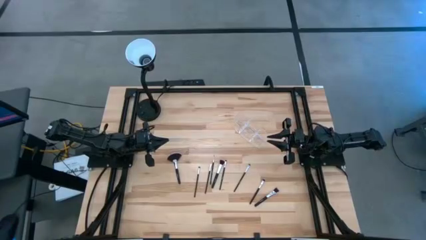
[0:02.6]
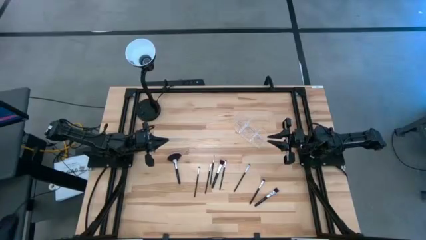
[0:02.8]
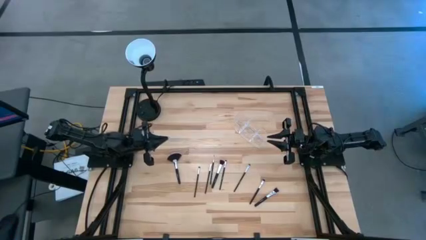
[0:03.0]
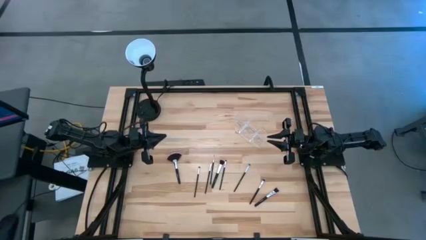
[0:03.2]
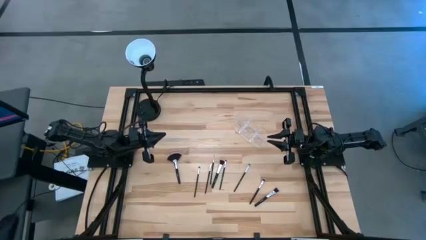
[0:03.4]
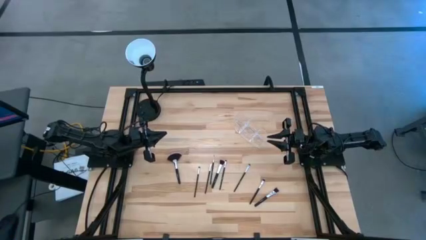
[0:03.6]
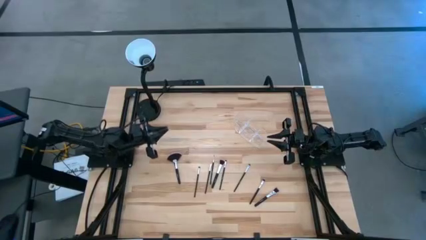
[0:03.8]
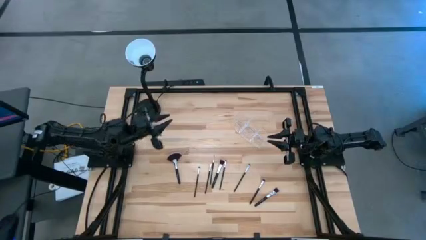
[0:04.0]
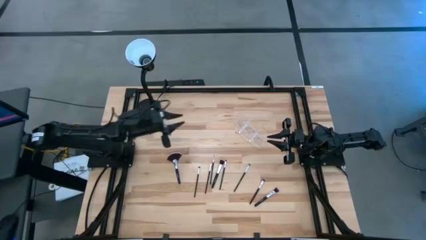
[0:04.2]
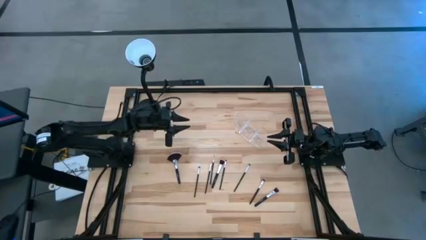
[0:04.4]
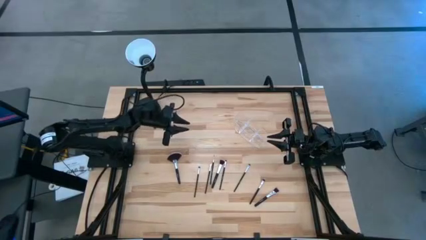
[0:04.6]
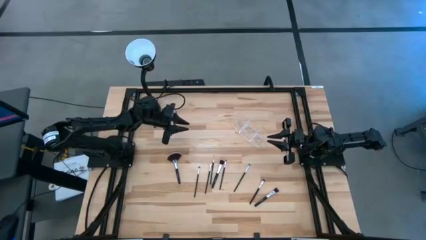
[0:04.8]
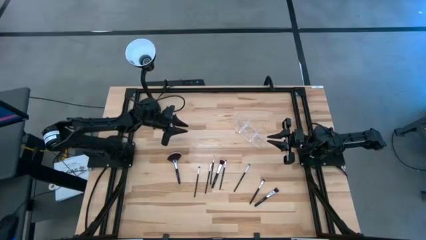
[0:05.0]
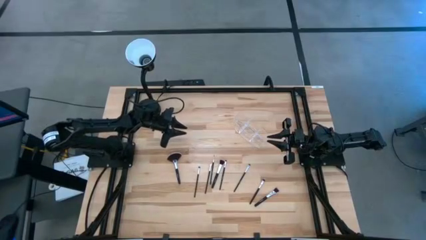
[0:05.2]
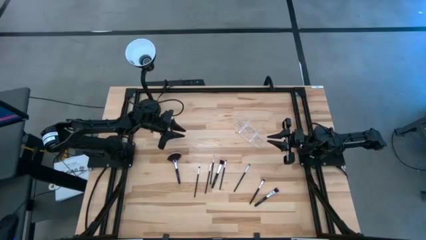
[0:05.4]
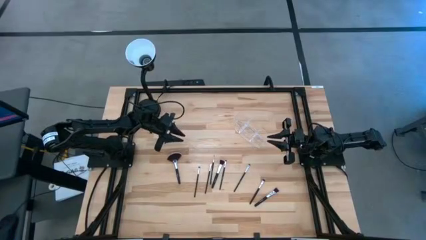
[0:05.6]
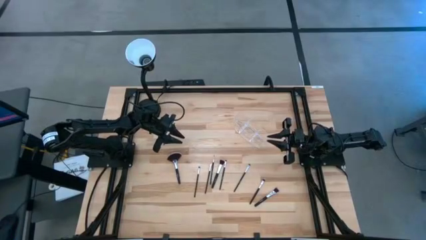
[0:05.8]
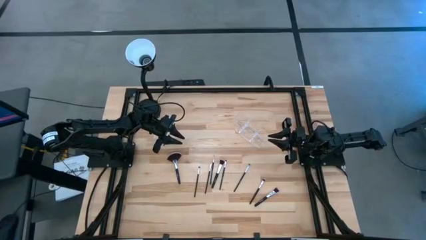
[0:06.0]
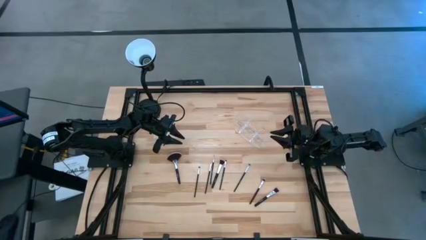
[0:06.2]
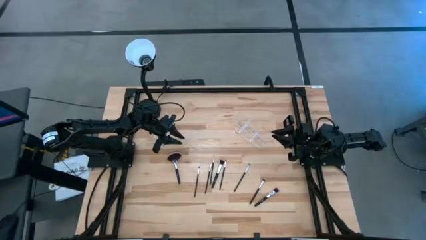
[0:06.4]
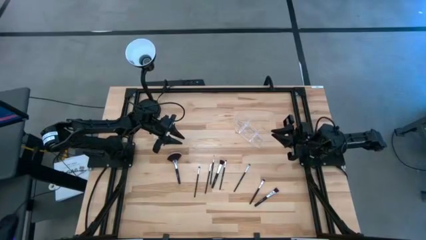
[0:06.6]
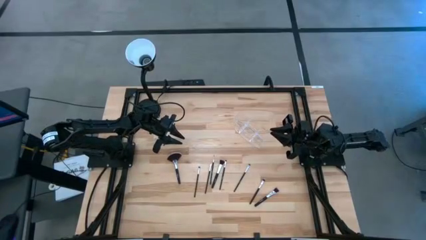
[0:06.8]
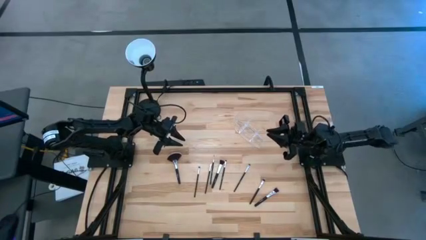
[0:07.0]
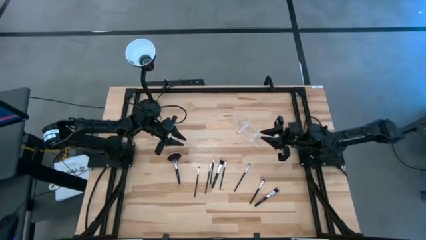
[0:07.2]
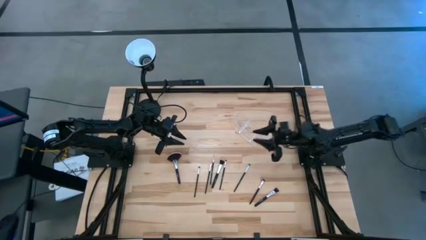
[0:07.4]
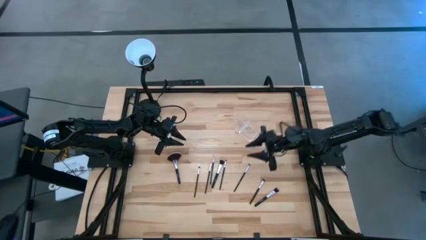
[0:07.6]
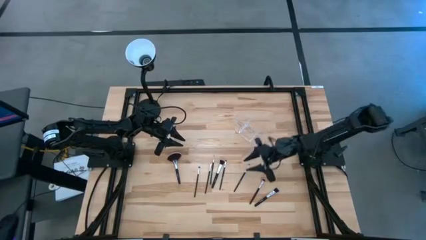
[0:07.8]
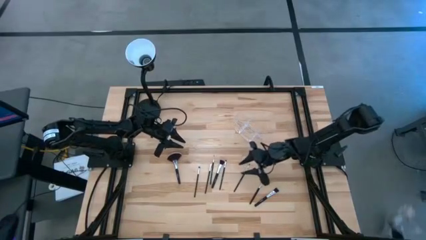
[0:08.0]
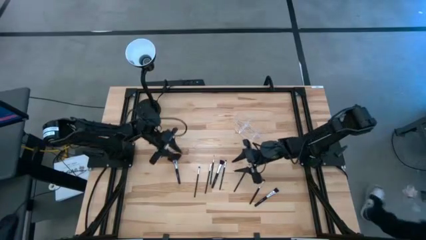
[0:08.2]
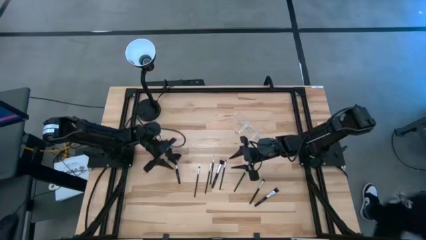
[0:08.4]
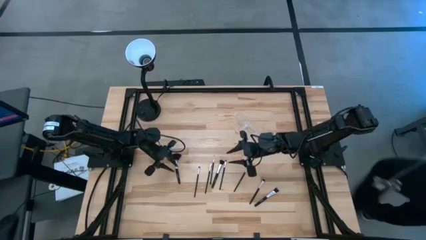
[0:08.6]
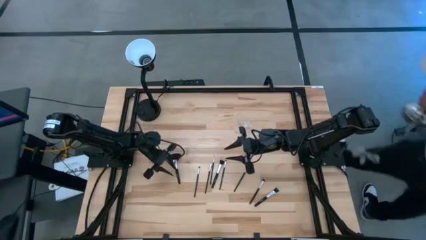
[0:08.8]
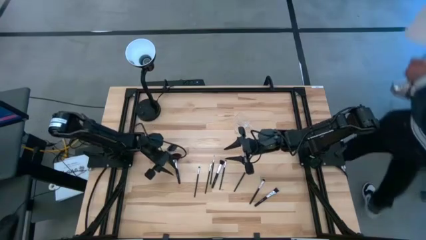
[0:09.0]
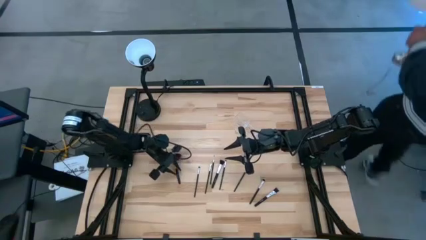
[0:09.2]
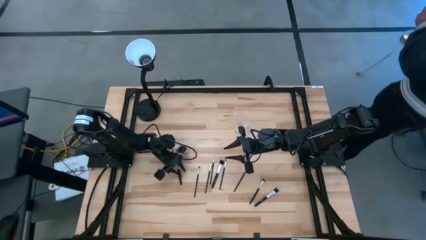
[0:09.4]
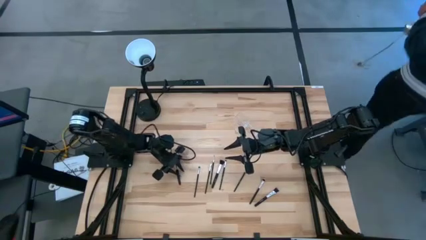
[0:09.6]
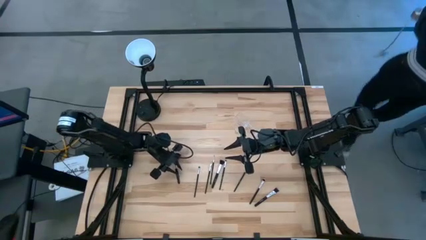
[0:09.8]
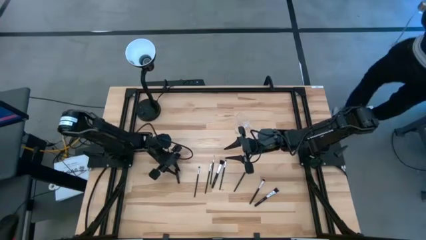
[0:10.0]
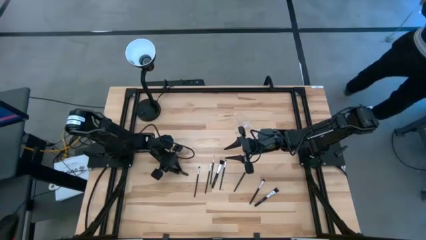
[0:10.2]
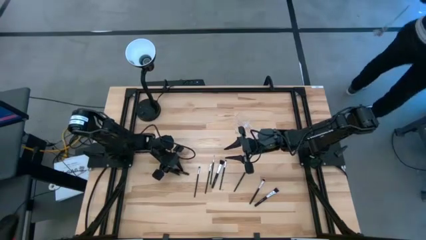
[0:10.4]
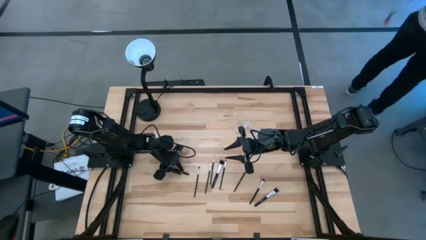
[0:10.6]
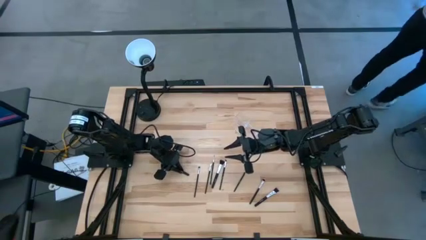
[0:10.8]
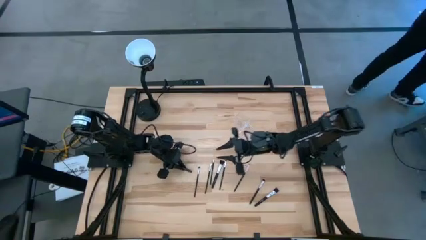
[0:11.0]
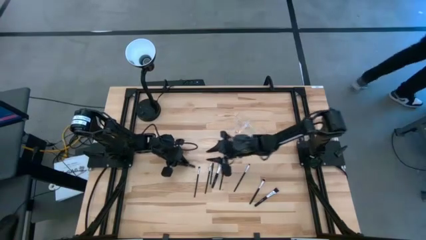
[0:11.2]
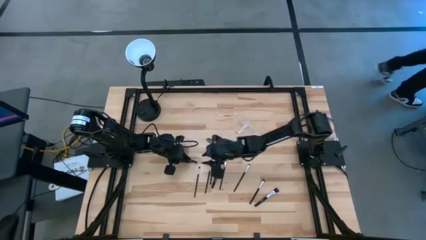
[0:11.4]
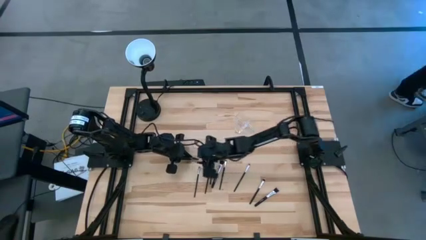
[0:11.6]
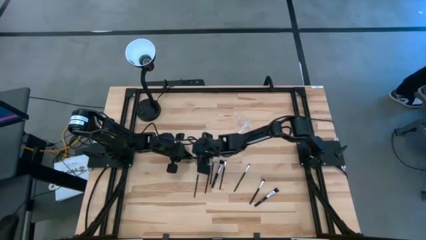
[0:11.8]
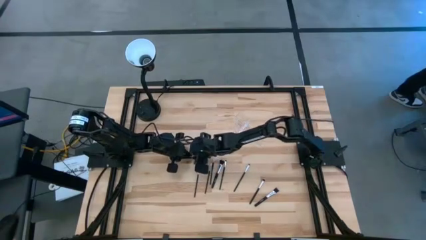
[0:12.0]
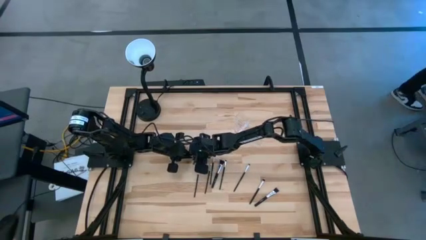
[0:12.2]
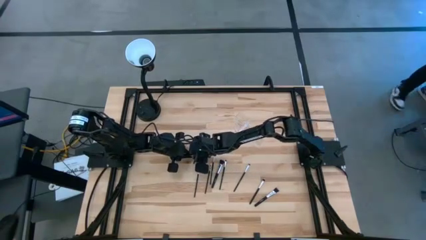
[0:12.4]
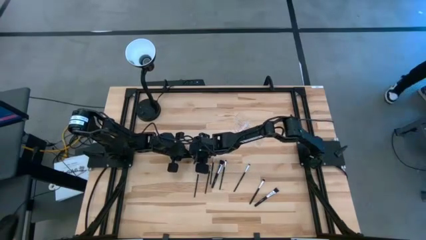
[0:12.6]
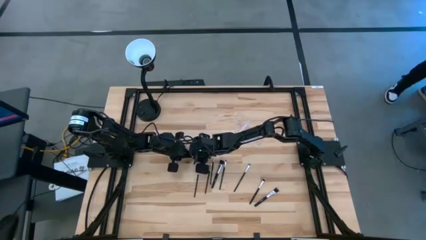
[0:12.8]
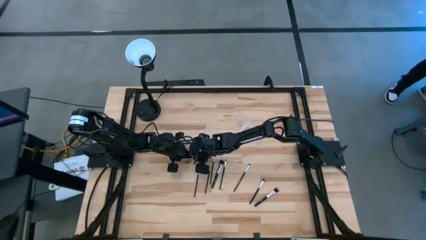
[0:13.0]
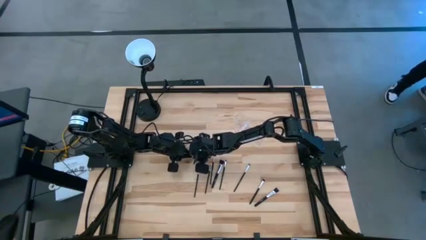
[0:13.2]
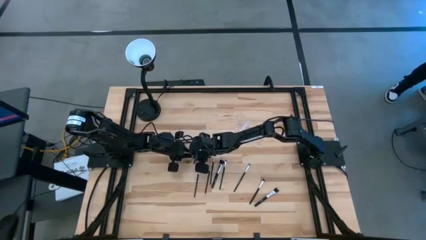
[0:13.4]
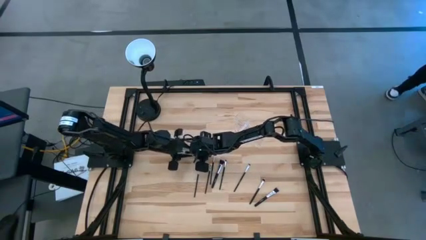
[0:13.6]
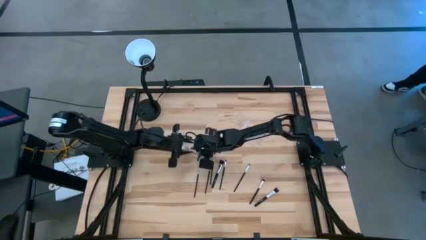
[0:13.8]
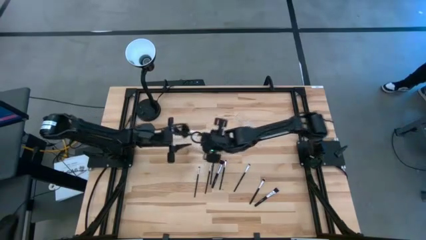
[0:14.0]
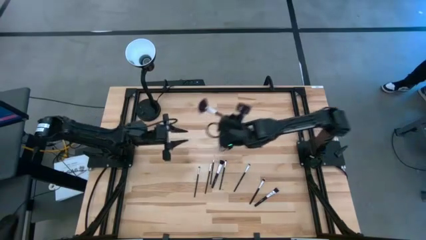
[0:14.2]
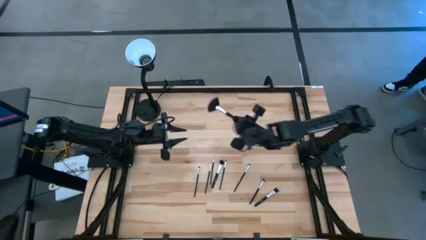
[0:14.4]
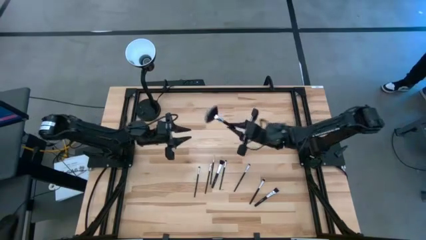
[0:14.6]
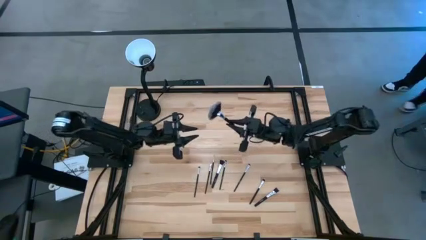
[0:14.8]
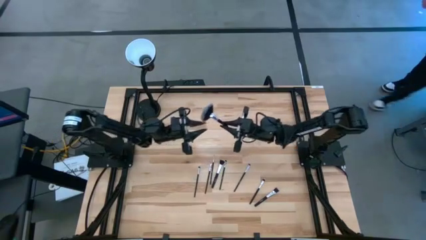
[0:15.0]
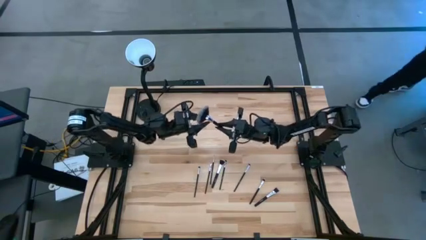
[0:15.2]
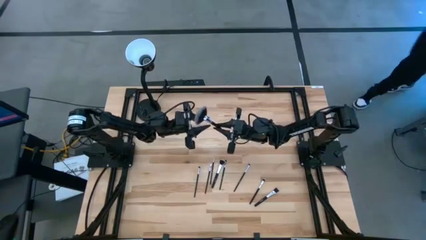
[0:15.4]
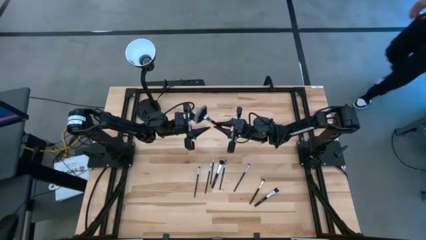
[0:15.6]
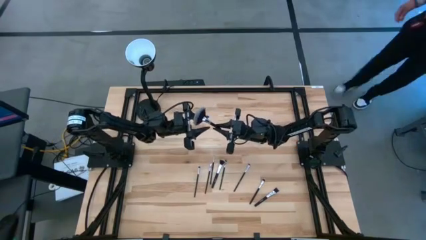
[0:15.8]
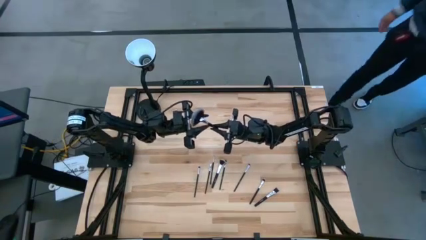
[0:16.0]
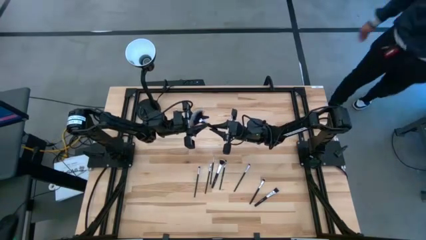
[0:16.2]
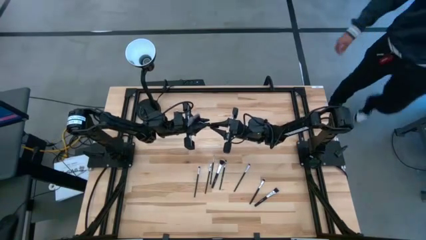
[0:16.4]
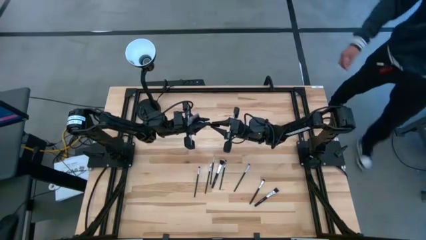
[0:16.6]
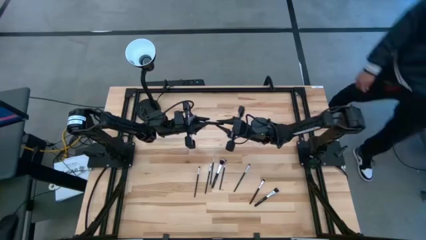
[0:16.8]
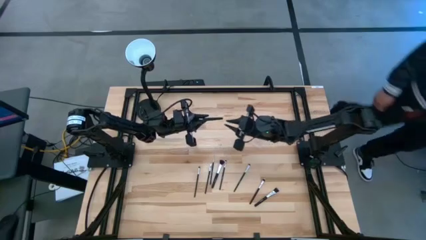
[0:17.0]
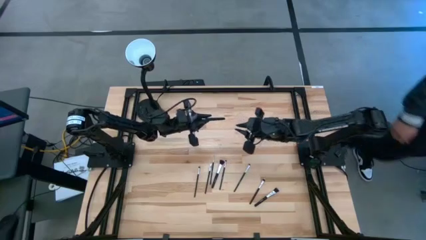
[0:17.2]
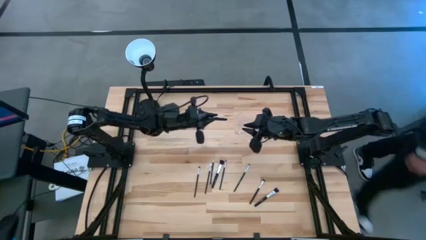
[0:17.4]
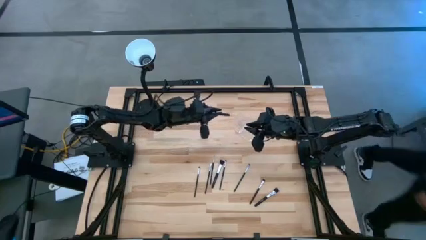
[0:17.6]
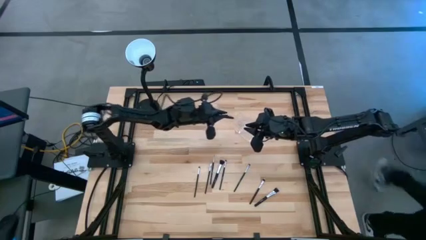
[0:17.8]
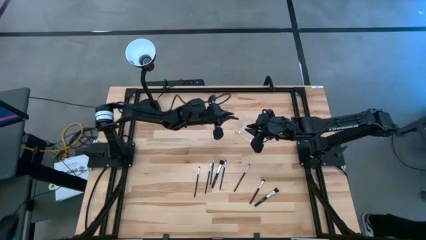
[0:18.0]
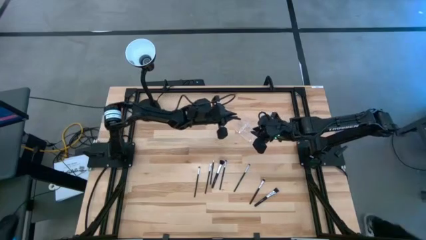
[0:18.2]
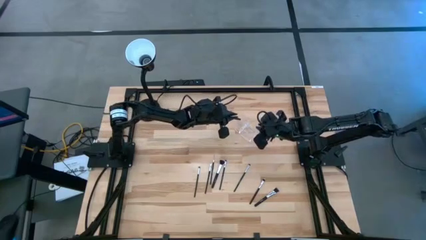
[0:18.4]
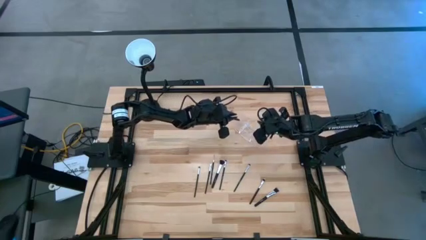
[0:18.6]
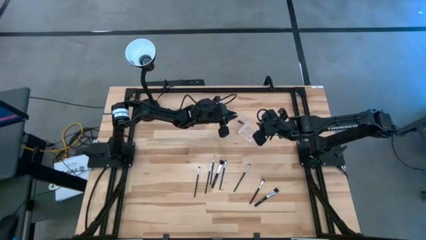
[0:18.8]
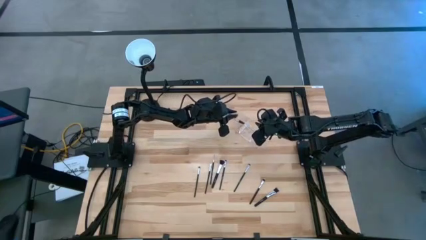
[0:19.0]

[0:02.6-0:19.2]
Task: Sort items
Put the highlighter brush into the left side of the transparent organizer
